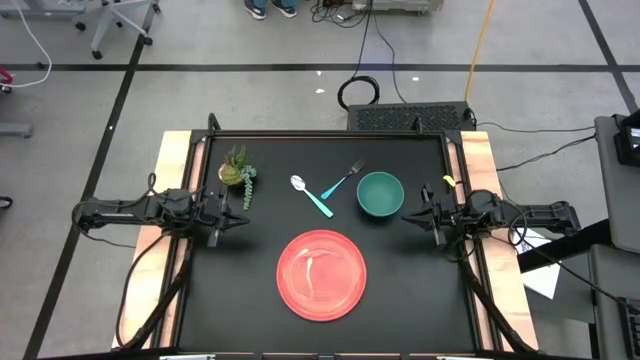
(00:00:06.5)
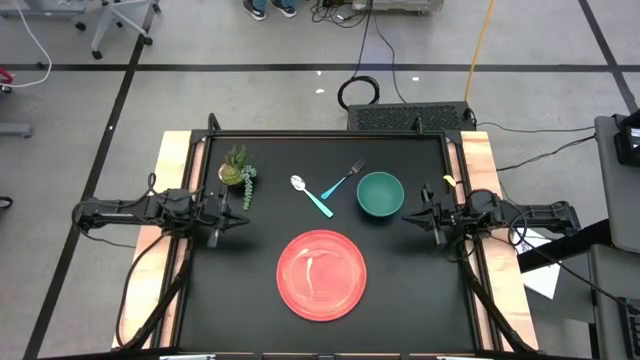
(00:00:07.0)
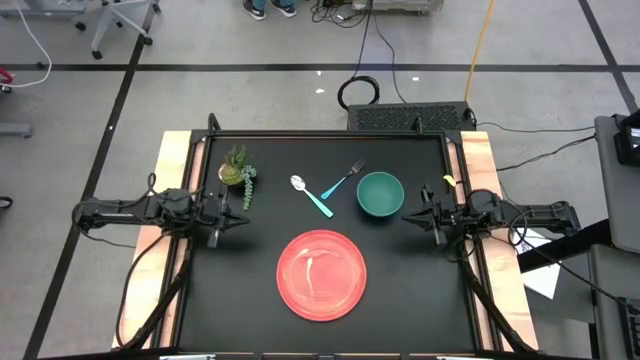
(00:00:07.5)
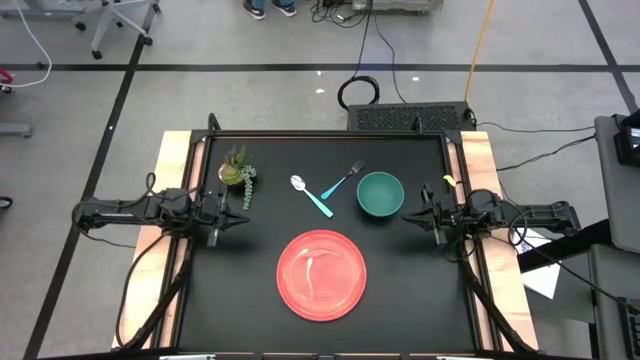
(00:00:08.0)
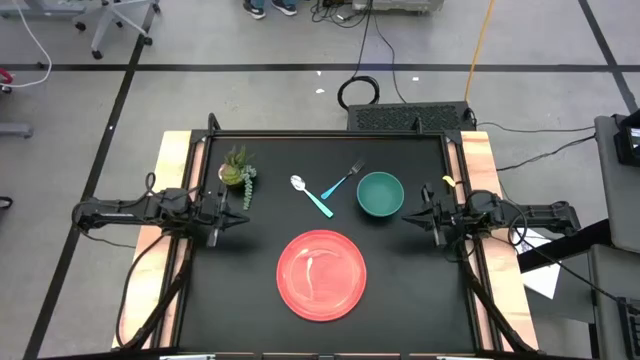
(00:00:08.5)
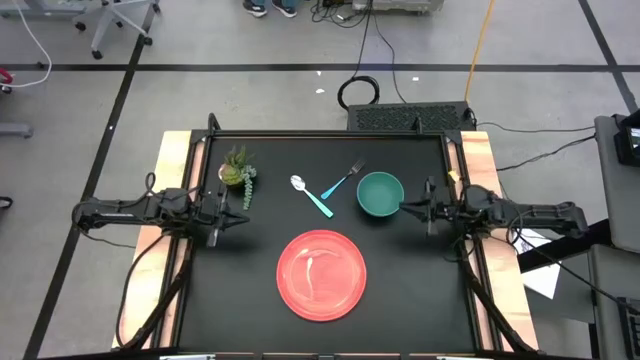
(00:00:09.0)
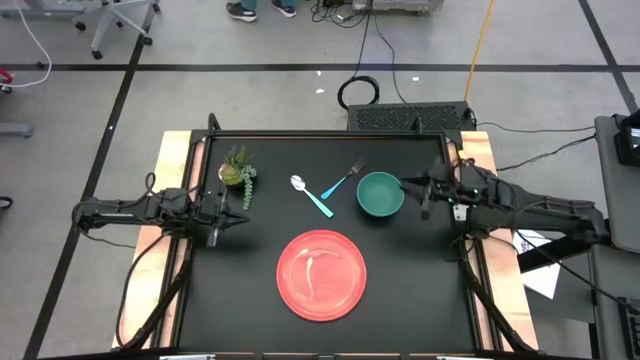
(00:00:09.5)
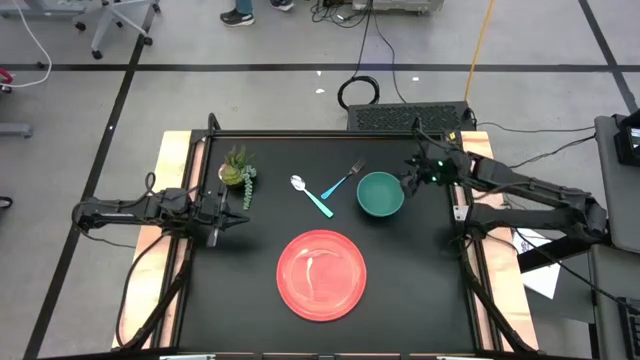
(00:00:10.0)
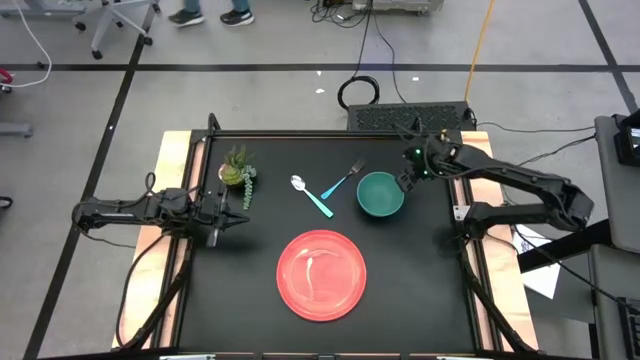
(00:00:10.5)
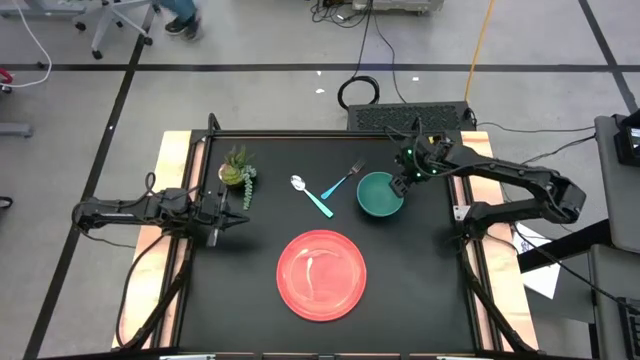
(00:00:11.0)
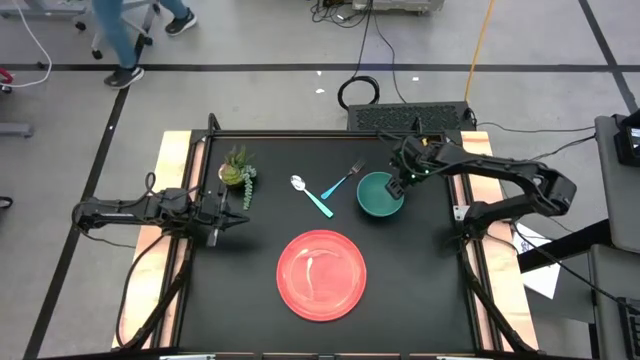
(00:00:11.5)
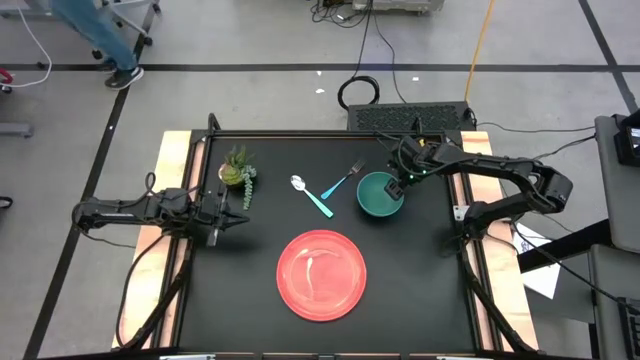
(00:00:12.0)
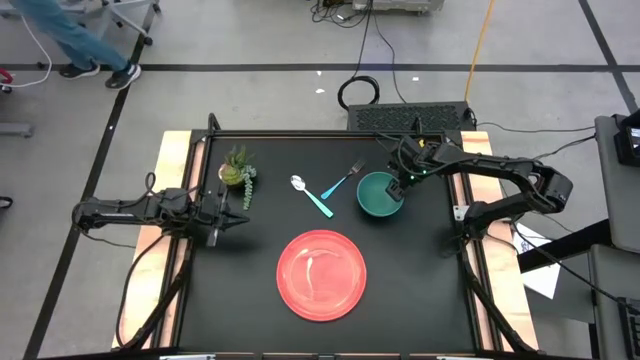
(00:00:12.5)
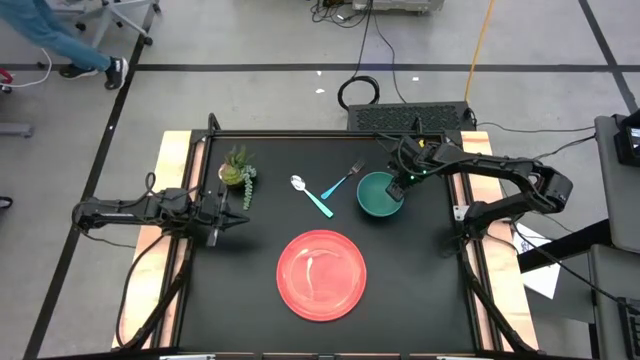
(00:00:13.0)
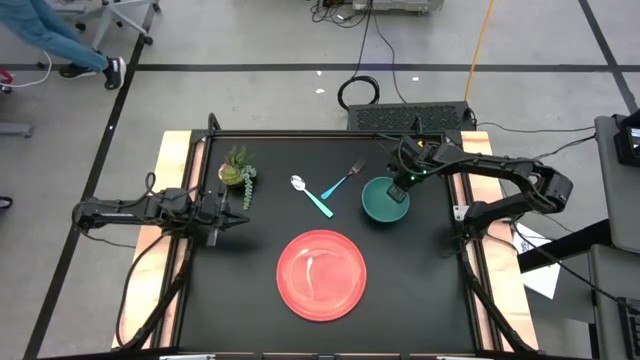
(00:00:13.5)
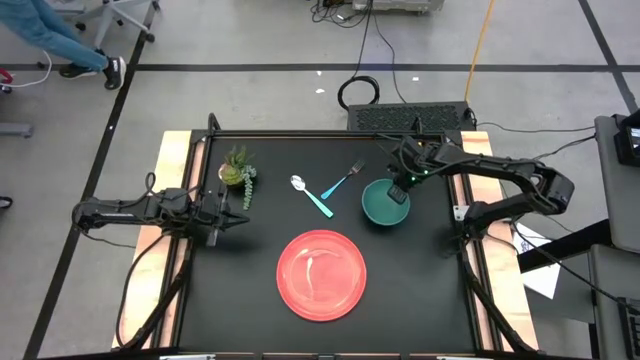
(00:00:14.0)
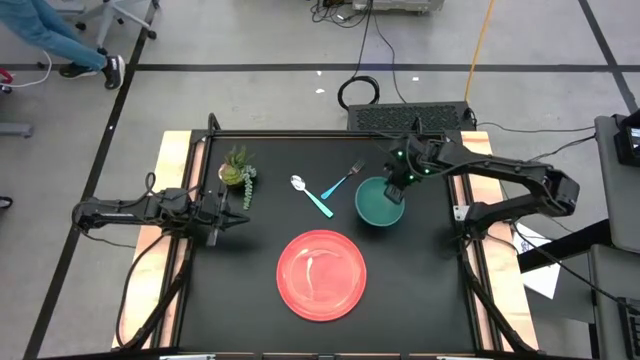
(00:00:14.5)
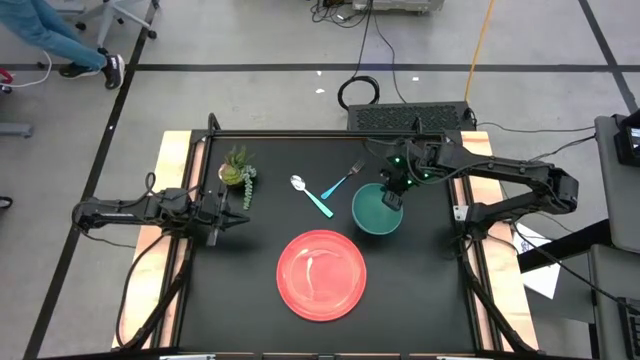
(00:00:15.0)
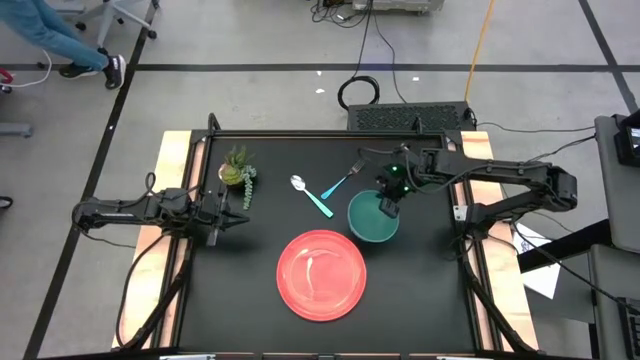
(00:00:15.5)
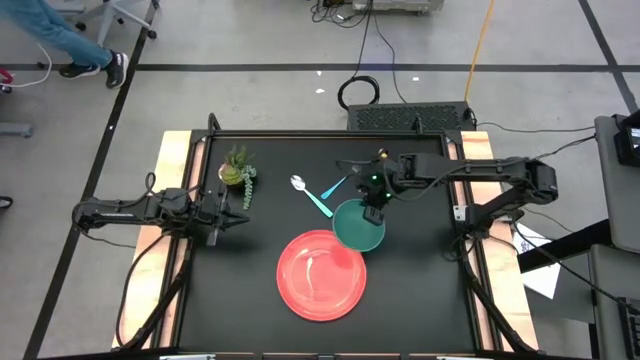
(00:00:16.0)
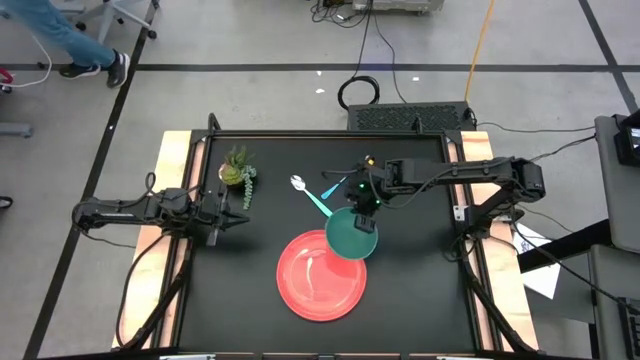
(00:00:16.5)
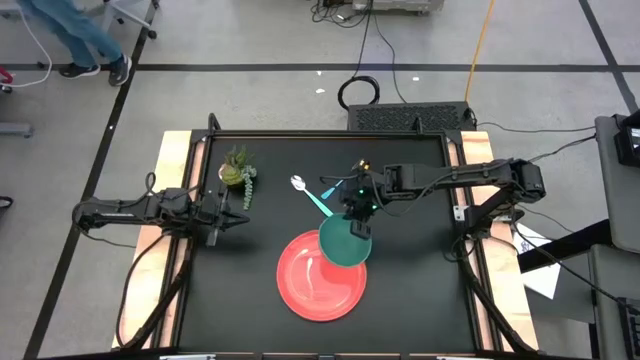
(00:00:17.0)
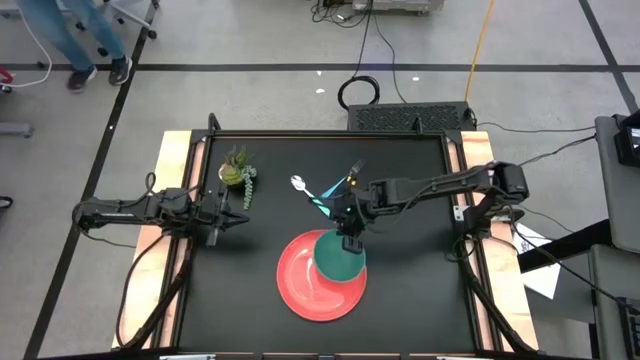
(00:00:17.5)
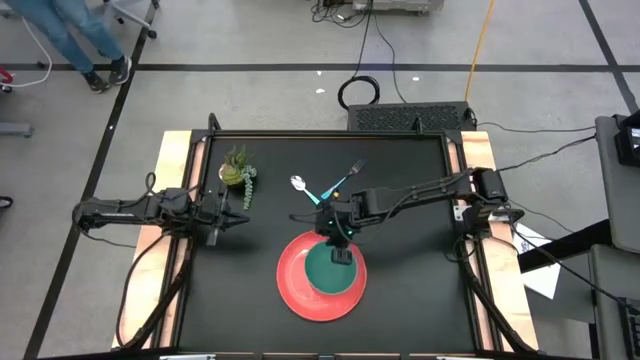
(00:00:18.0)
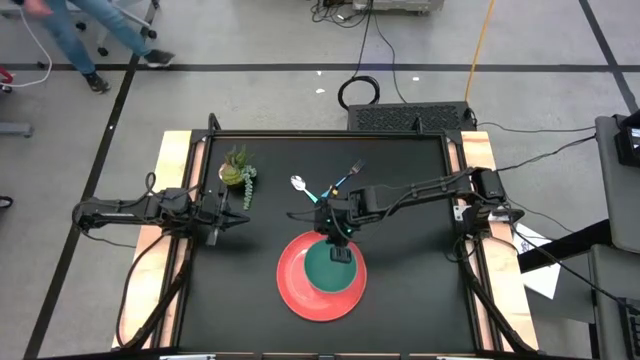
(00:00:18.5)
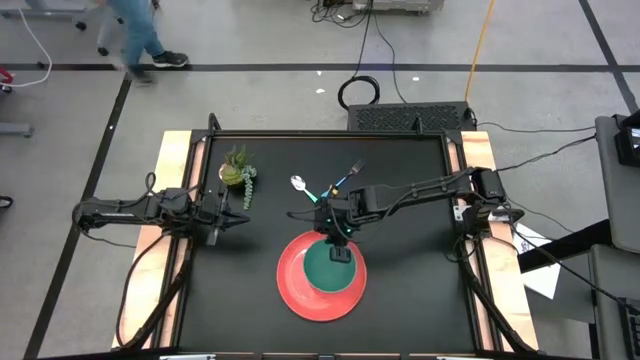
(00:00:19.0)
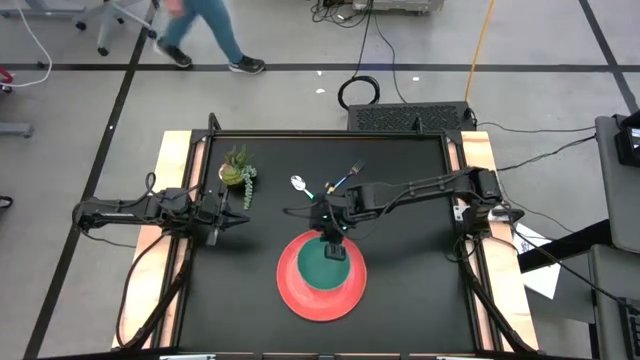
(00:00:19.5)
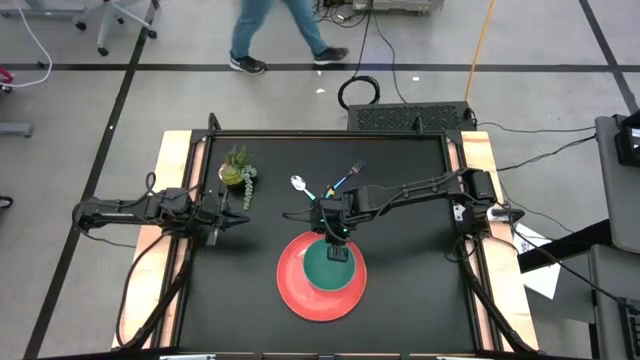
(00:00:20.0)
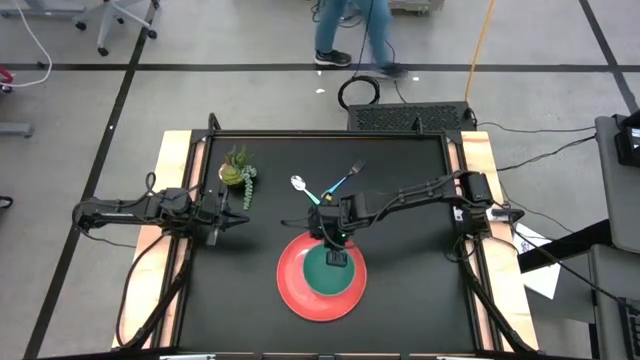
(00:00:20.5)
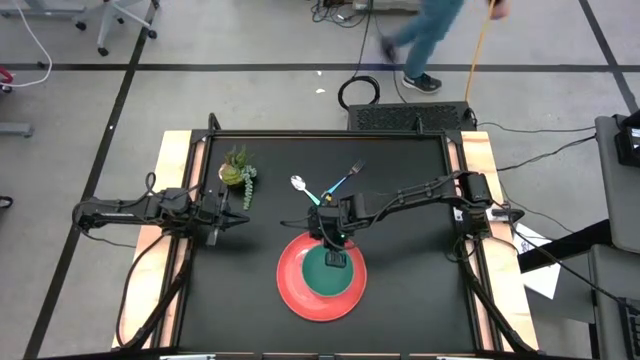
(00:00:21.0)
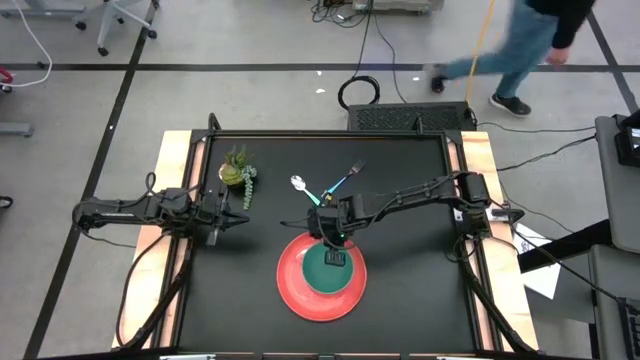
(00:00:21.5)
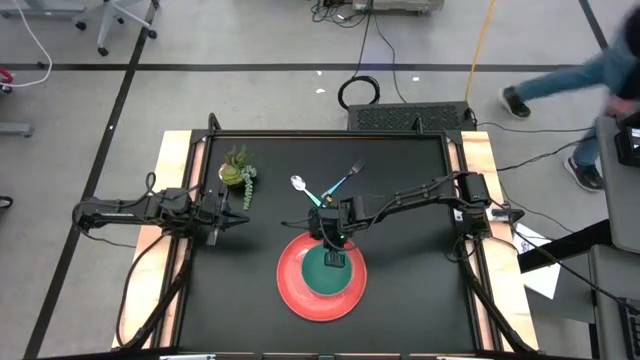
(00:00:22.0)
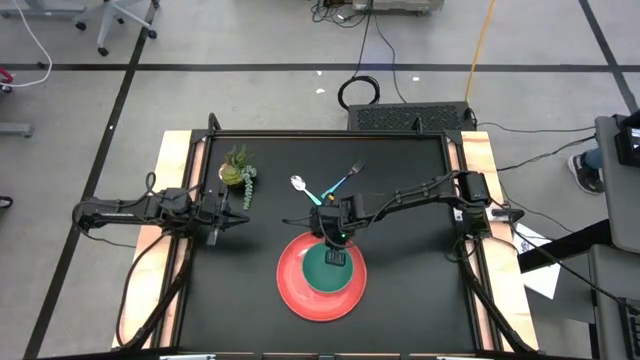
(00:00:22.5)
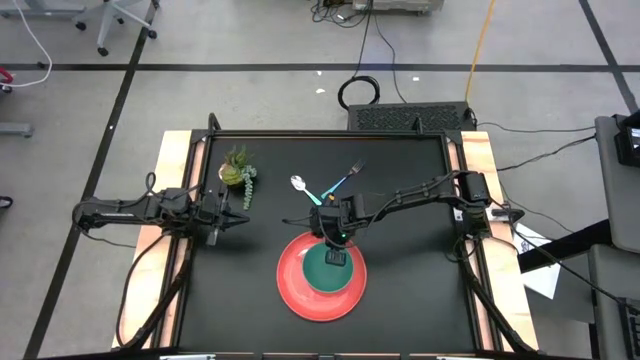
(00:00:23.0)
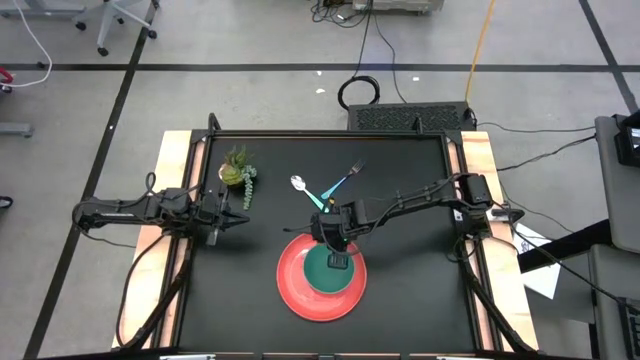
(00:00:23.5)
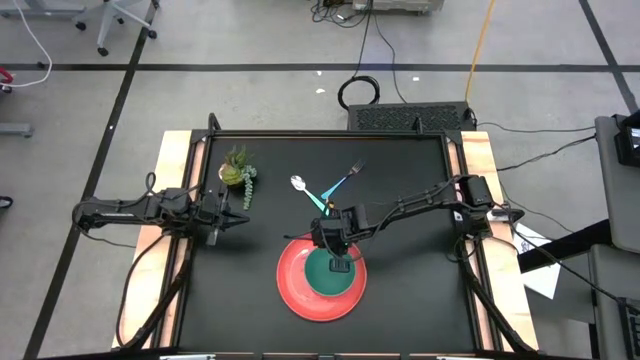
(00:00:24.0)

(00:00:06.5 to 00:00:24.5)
Task: Set table place
Put the green bowl on the orange plate

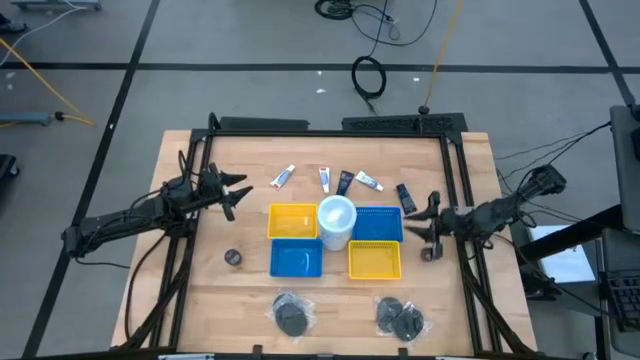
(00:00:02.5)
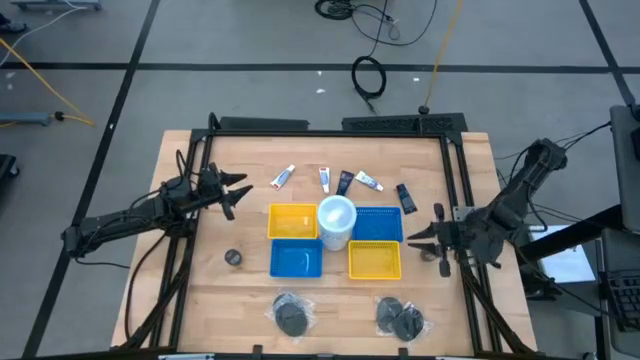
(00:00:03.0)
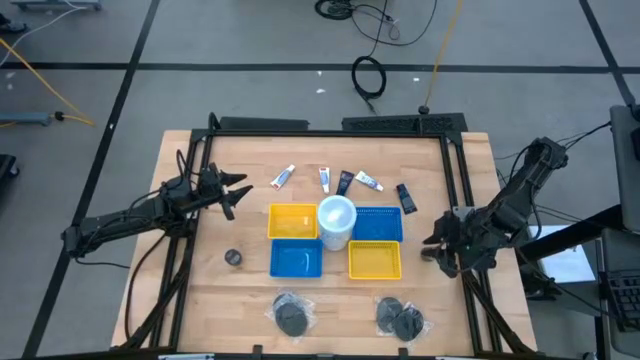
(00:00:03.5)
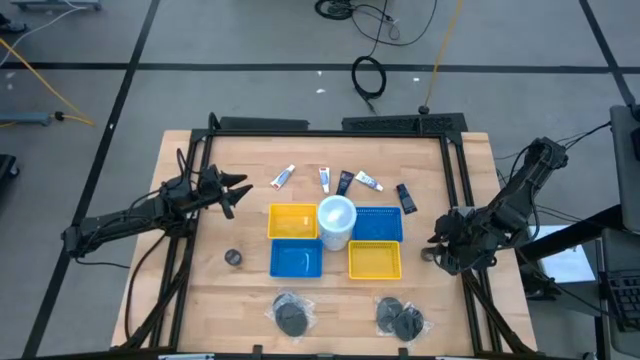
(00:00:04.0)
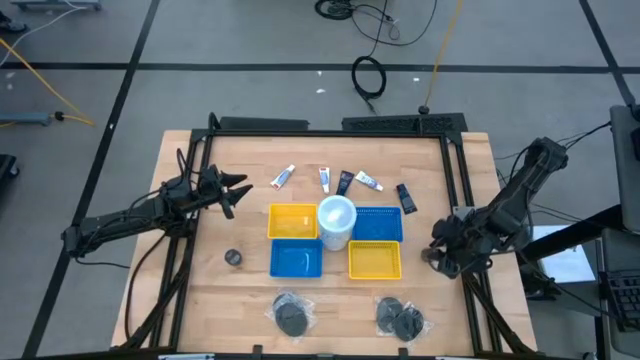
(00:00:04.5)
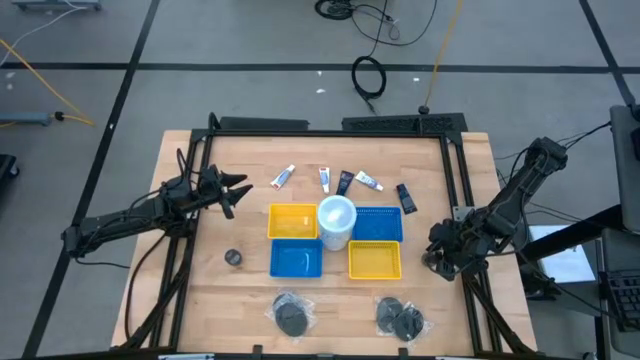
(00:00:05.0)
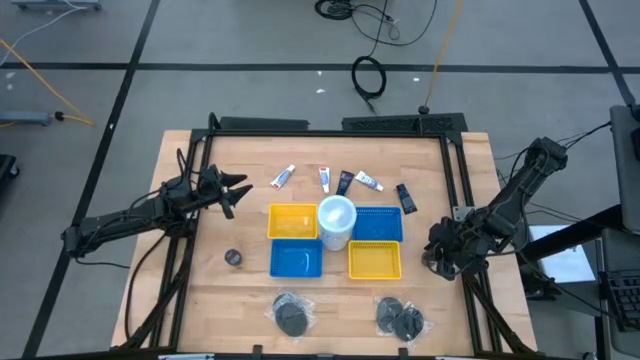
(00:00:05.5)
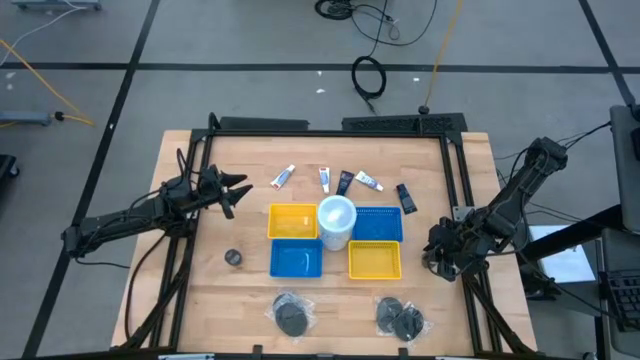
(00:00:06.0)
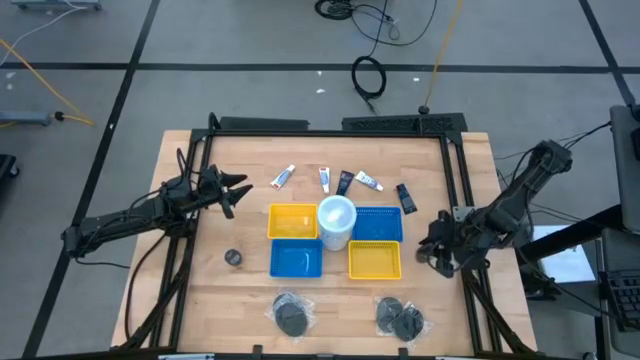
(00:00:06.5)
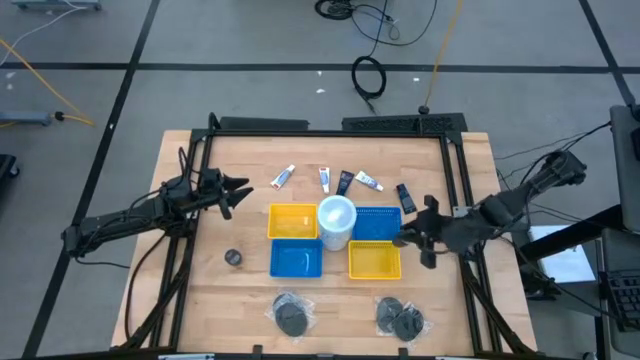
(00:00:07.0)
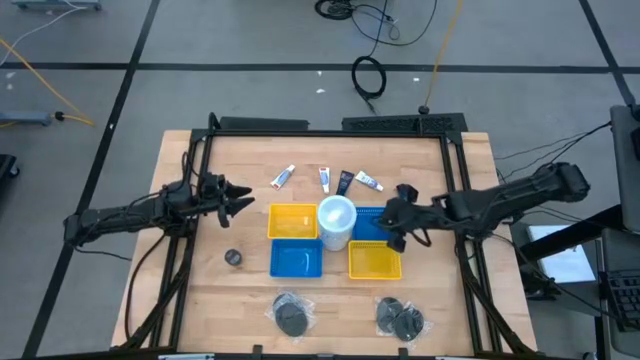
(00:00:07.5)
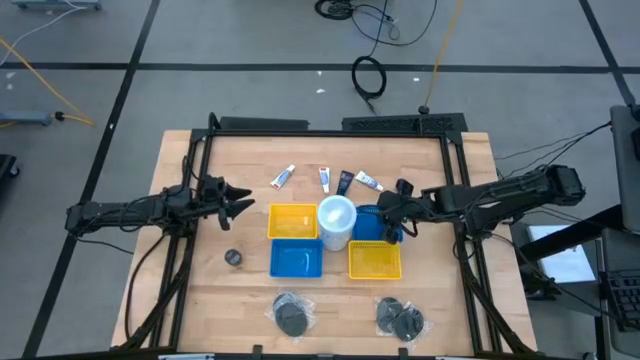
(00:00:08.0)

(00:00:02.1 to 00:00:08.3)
Task: Pick & Place Travel size toiletries
Put the black deodorant into the top blue bin
